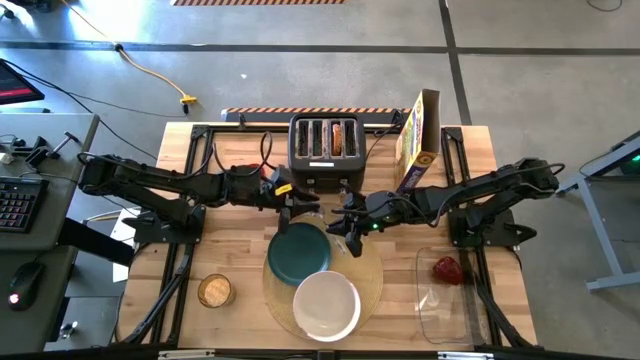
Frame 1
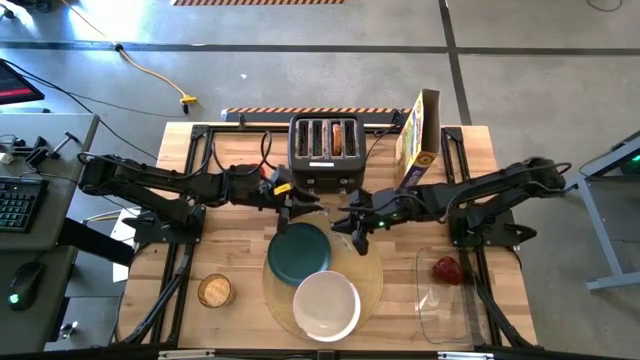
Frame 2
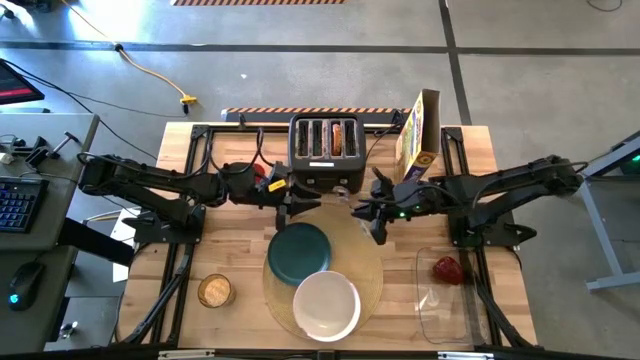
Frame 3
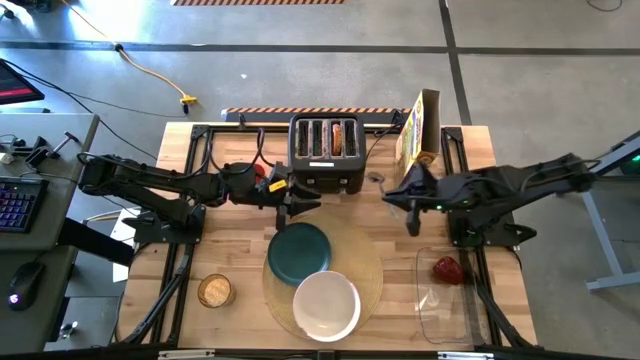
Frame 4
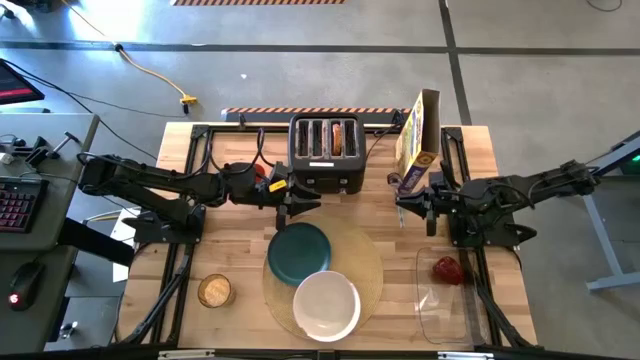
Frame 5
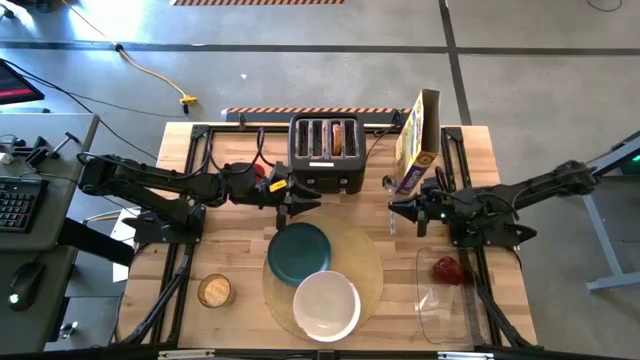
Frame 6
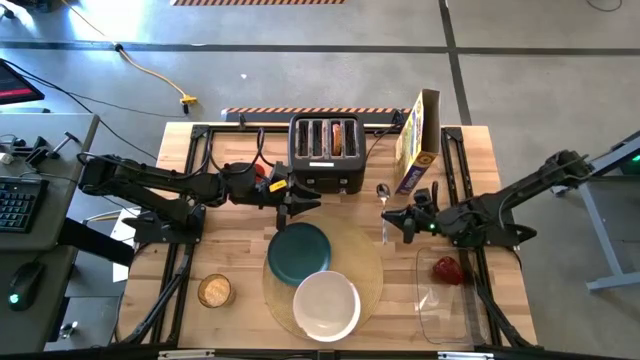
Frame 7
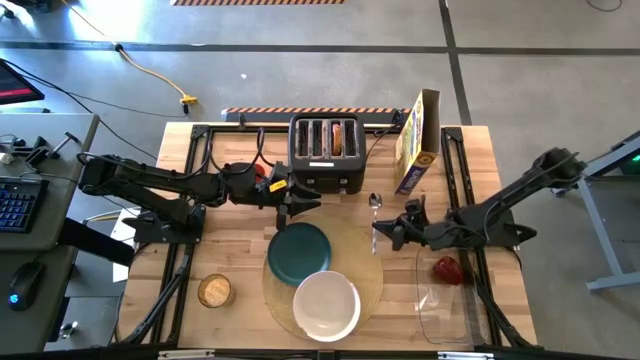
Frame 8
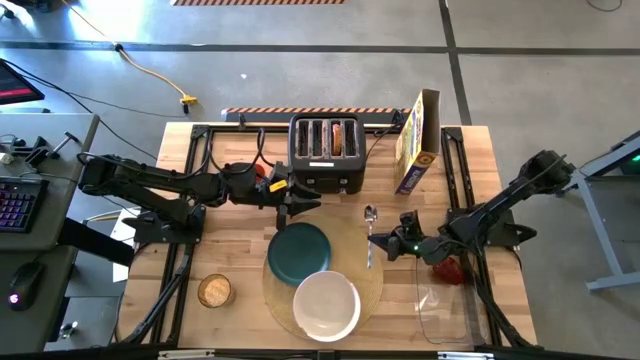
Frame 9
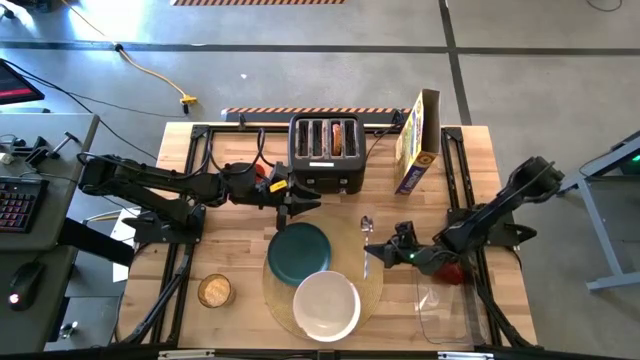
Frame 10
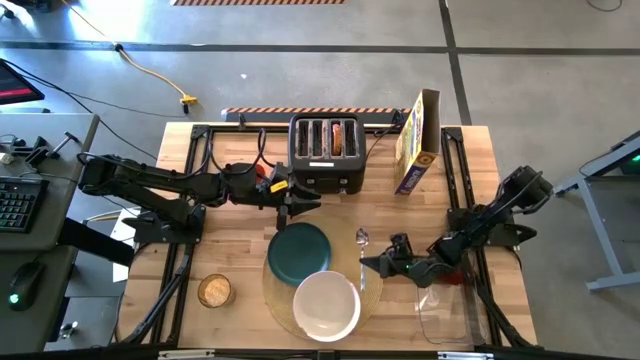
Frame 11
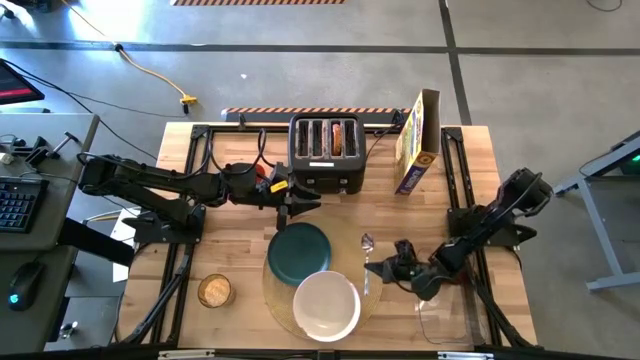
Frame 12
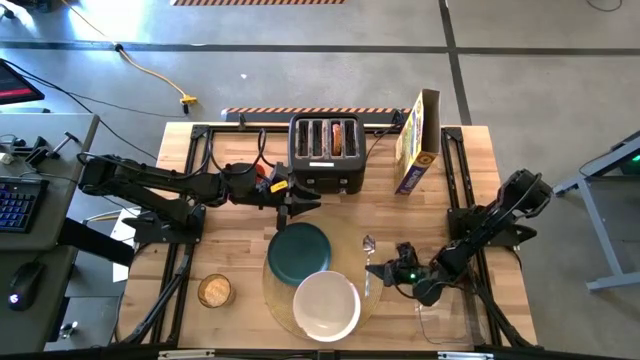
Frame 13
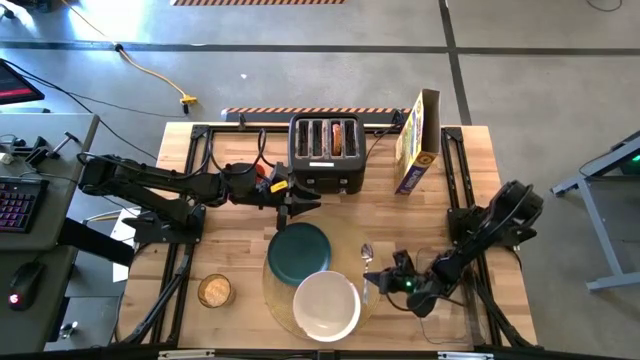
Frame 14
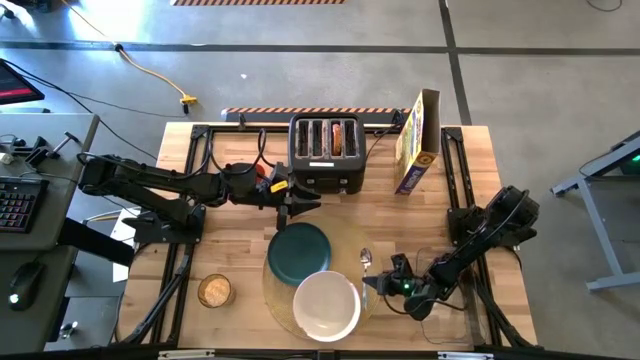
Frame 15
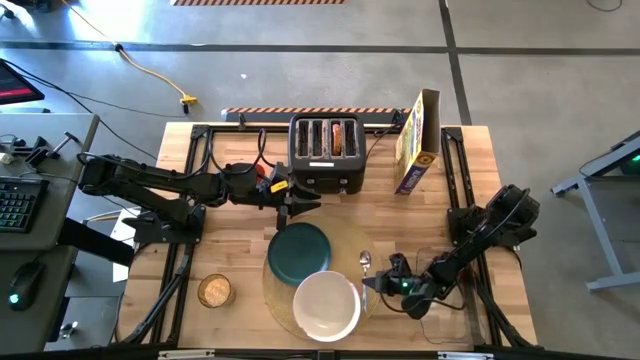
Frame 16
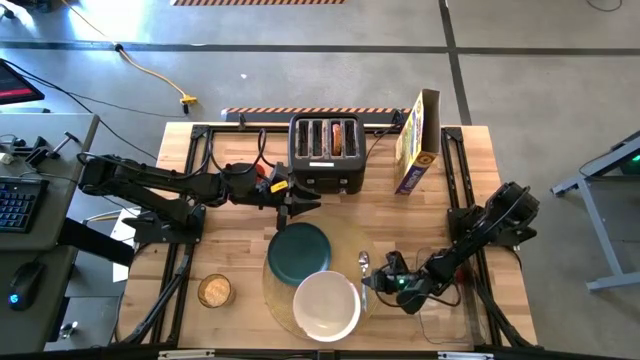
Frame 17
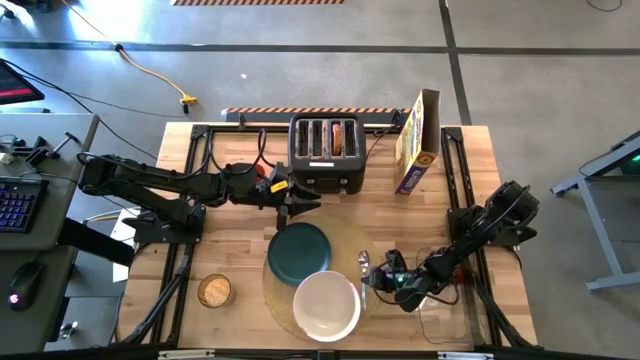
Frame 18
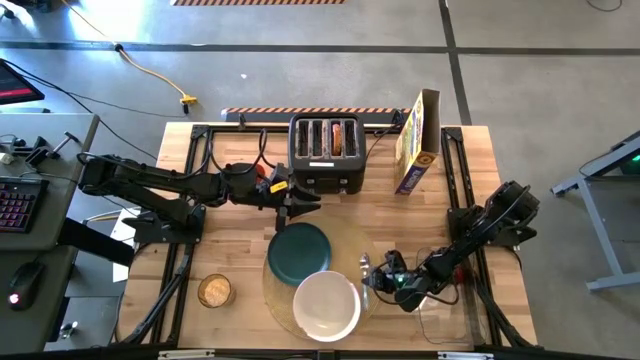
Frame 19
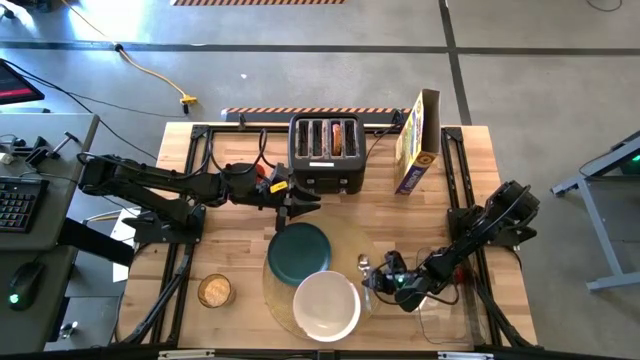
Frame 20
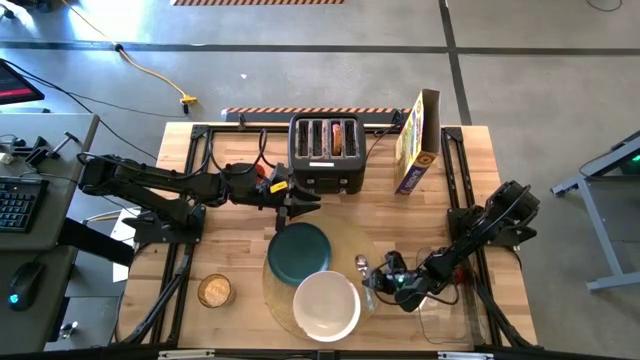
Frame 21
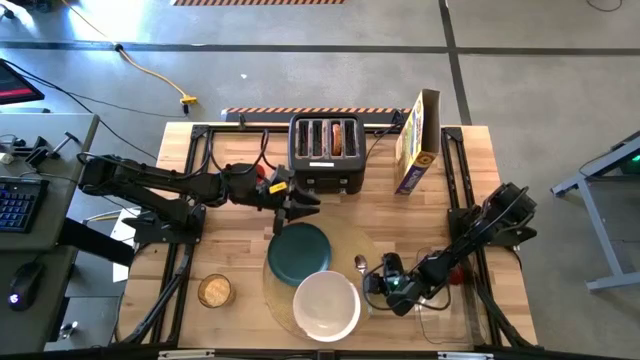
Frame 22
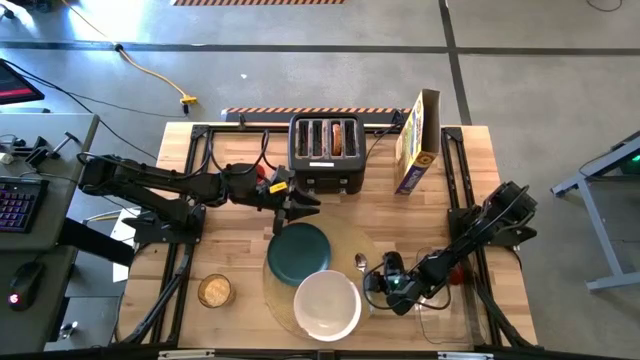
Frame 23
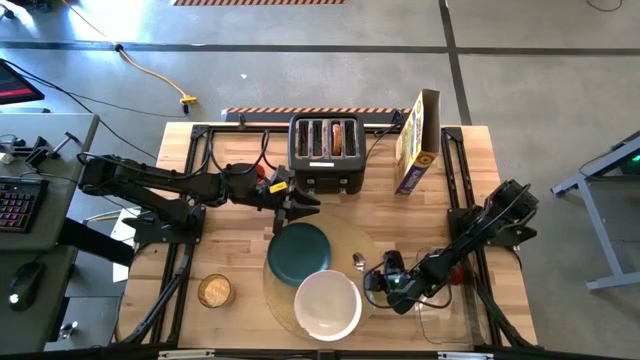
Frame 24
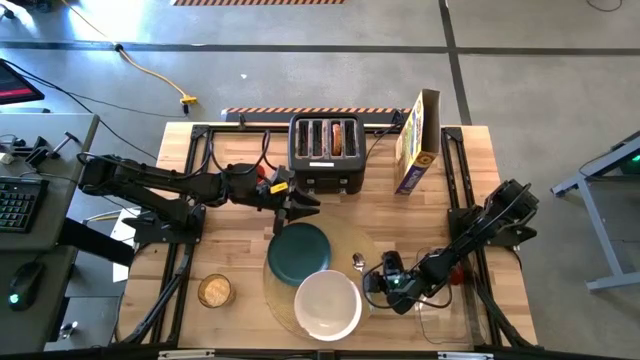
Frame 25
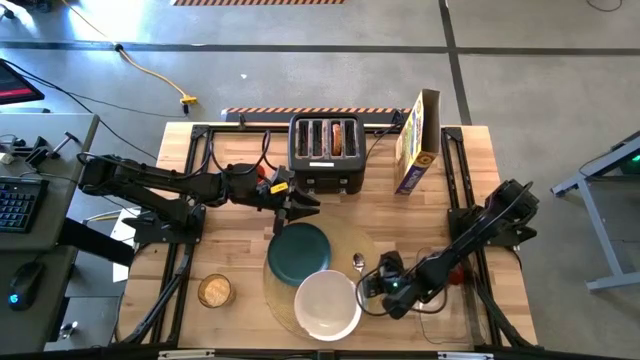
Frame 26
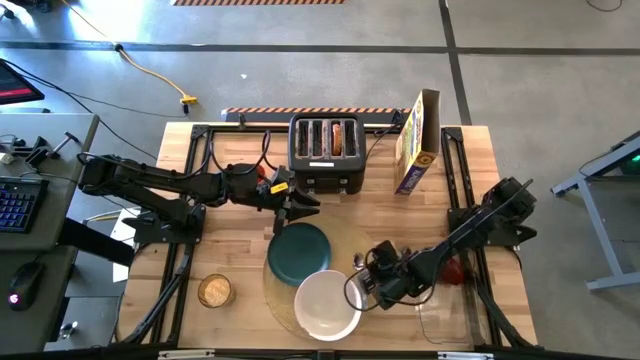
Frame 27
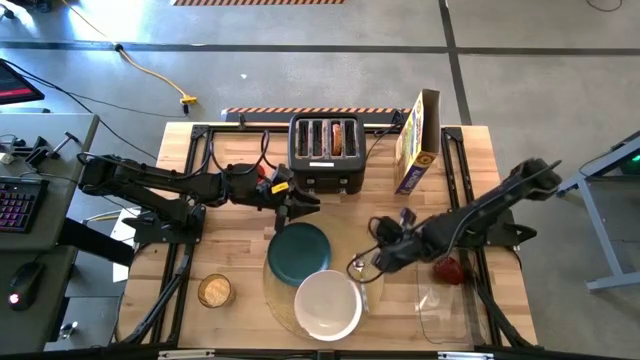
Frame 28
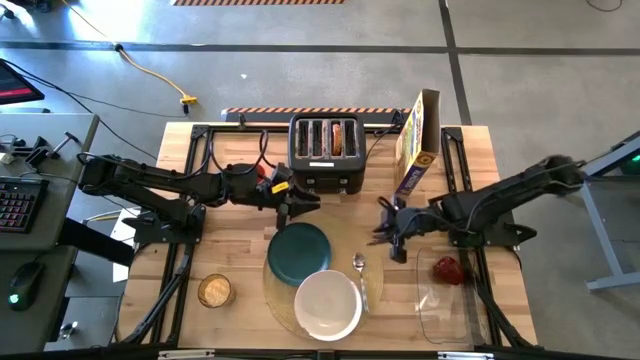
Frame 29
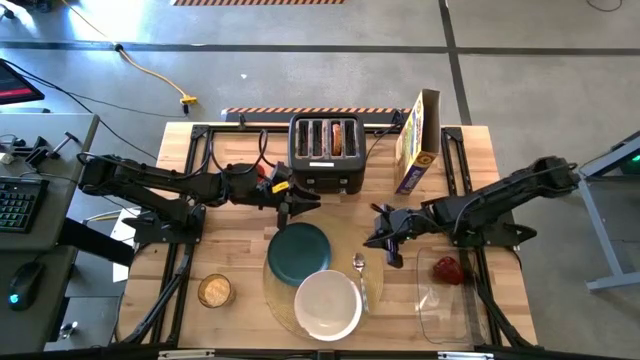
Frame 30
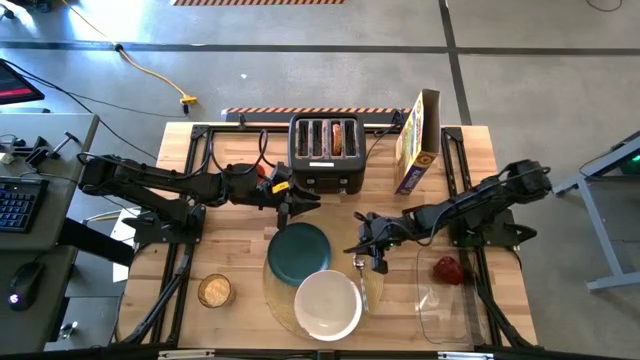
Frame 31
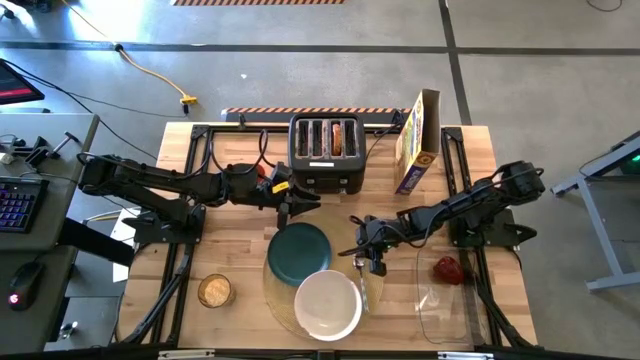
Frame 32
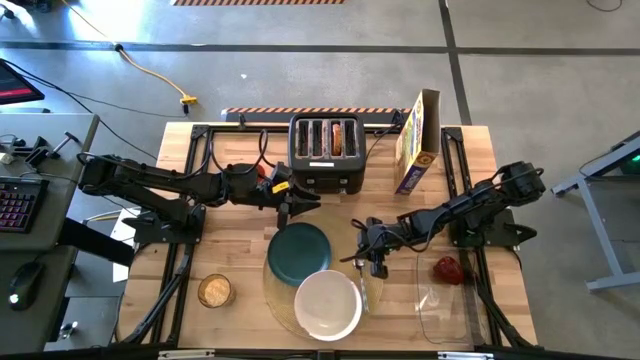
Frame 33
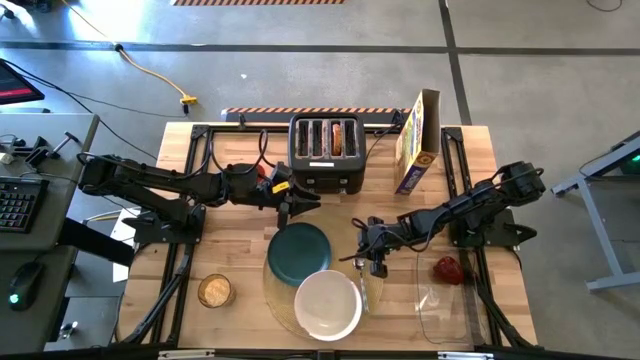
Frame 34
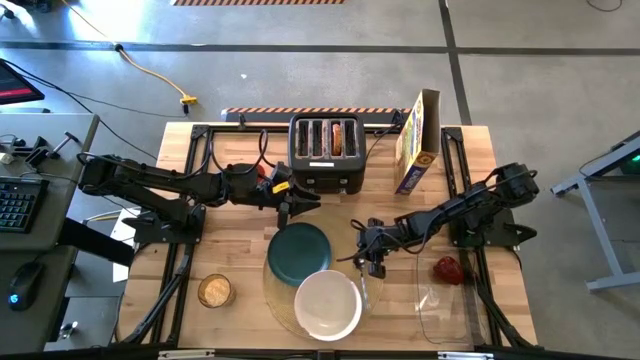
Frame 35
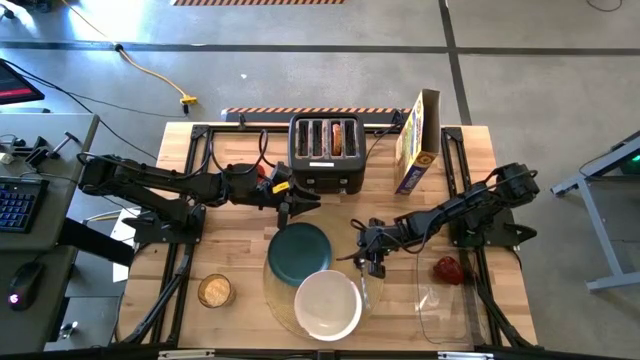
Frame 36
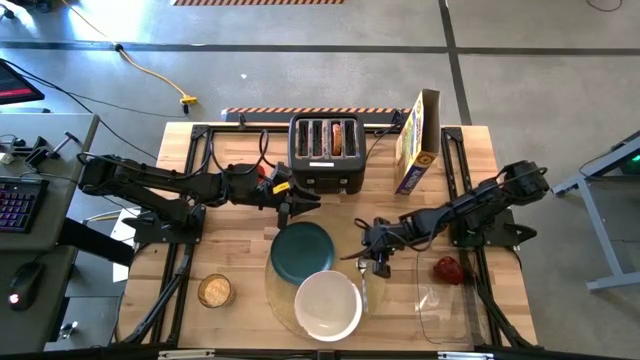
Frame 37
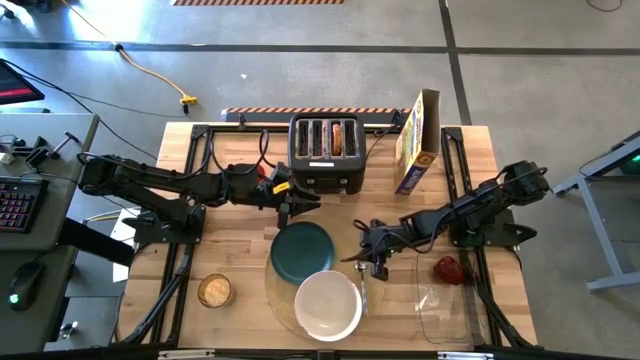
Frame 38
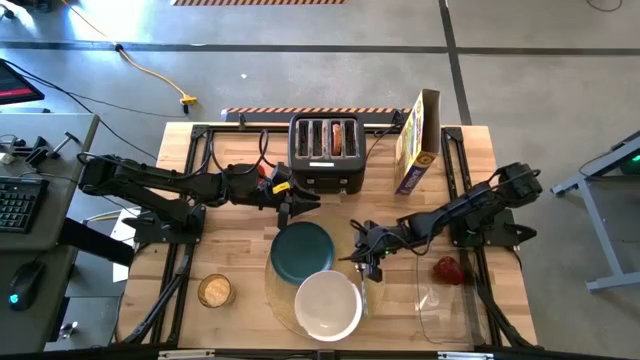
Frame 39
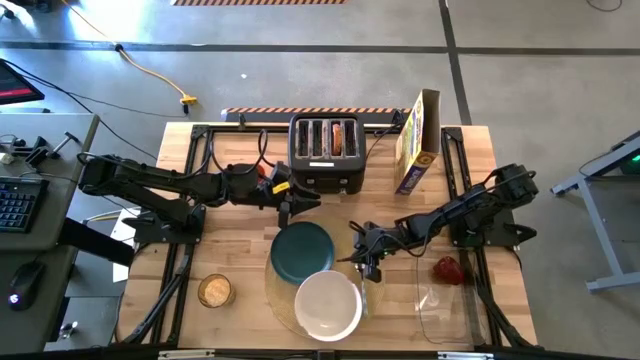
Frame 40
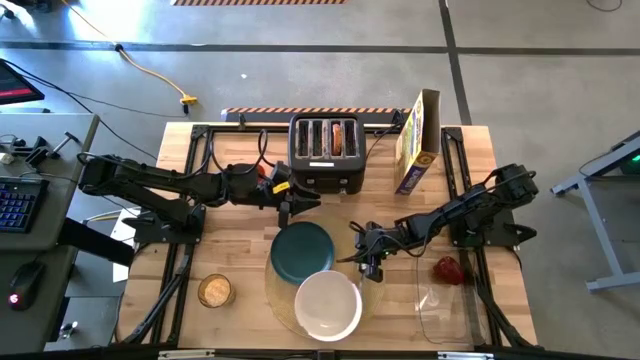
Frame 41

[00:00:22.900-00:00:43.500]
Task: Arrange a breakfast setting
Put the white patterned spoon on the brown table mat
